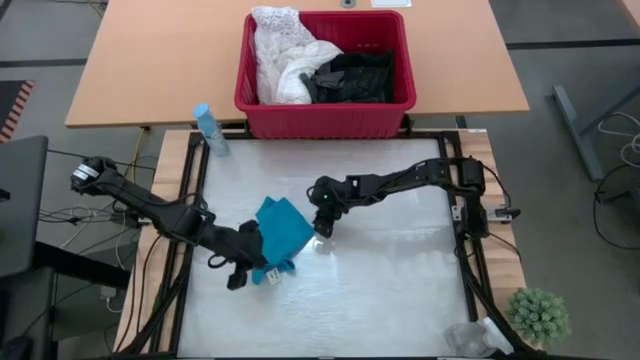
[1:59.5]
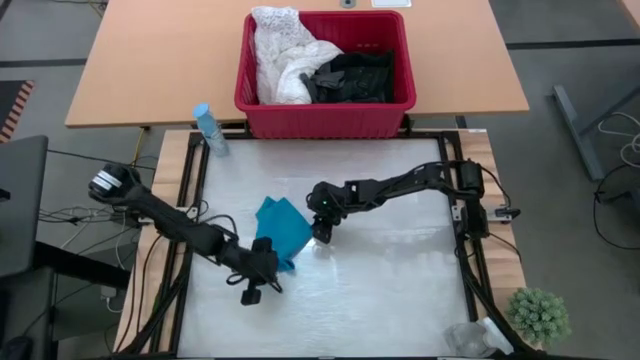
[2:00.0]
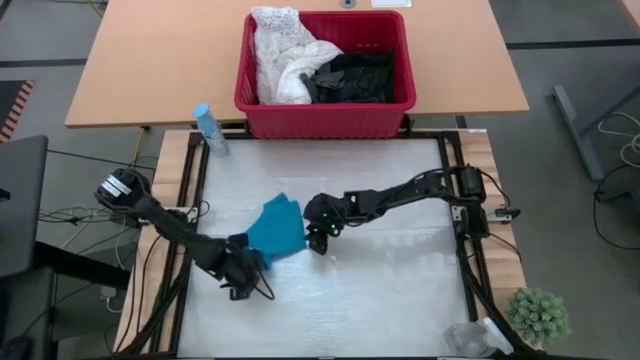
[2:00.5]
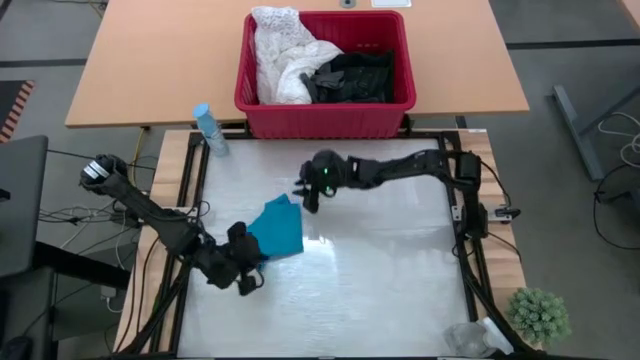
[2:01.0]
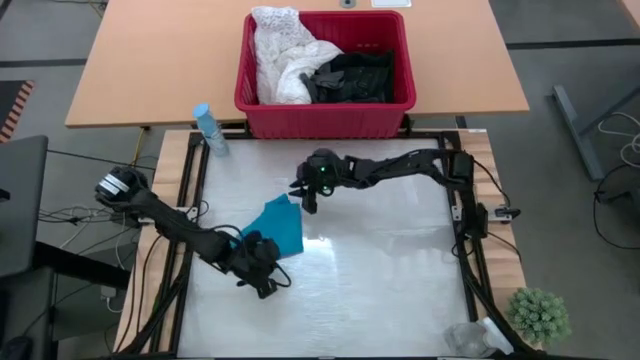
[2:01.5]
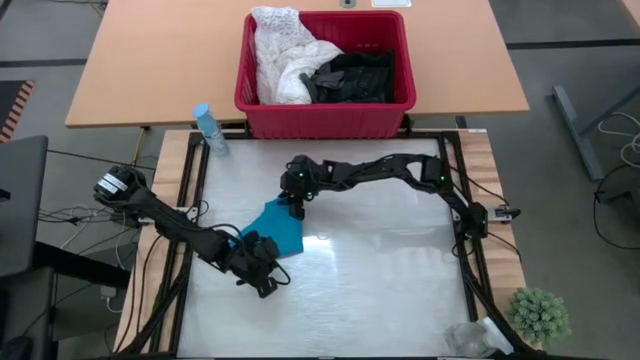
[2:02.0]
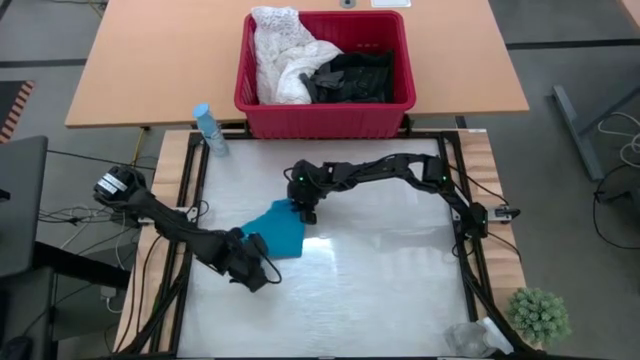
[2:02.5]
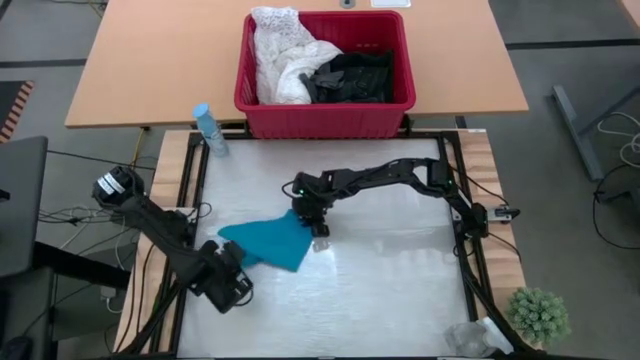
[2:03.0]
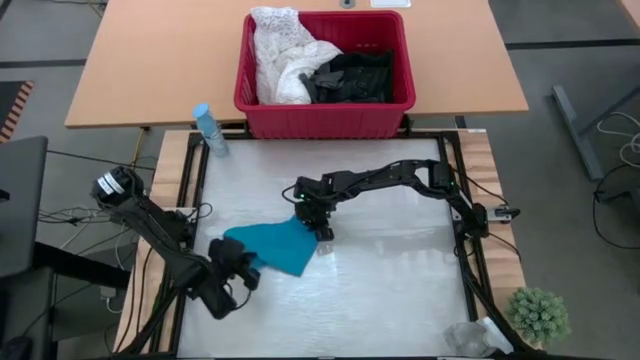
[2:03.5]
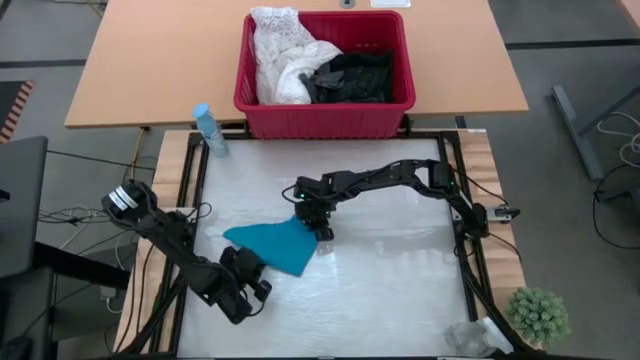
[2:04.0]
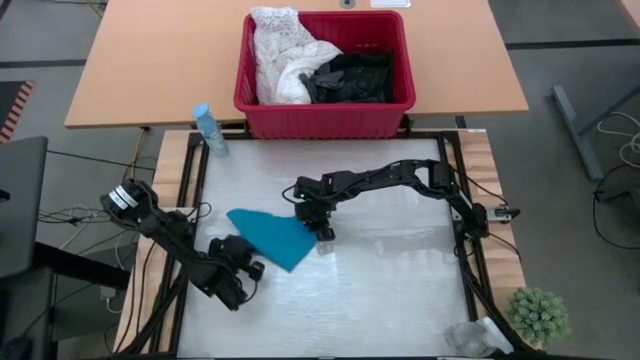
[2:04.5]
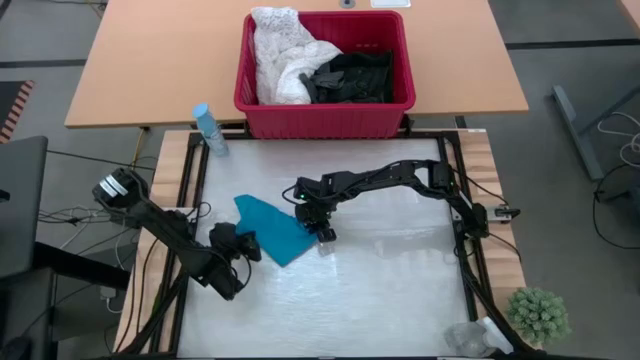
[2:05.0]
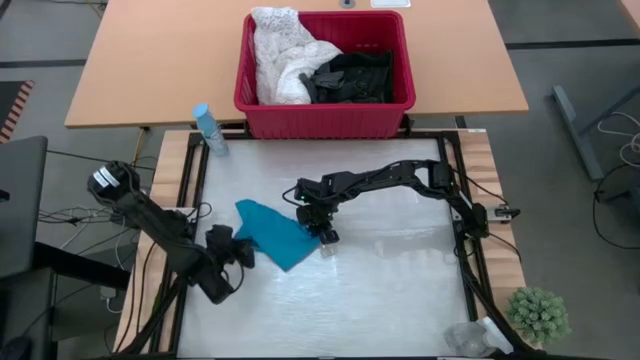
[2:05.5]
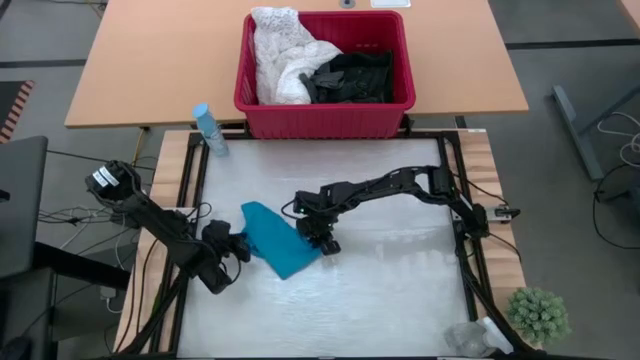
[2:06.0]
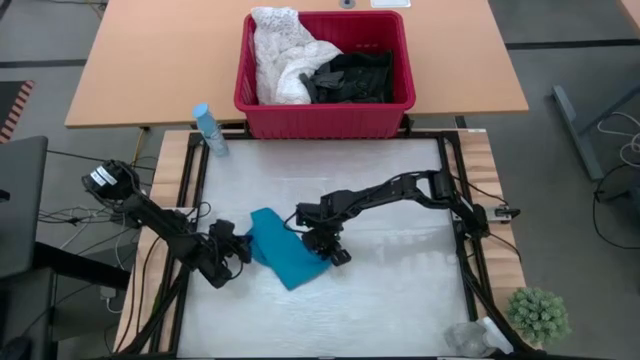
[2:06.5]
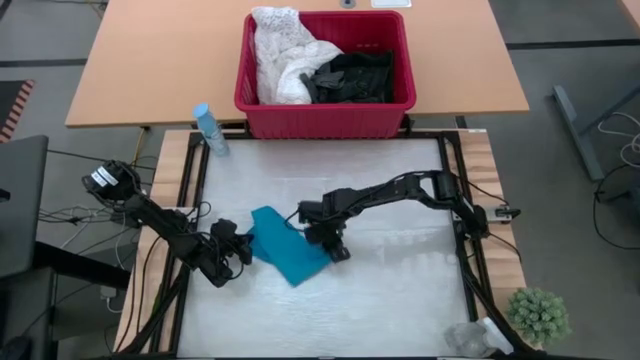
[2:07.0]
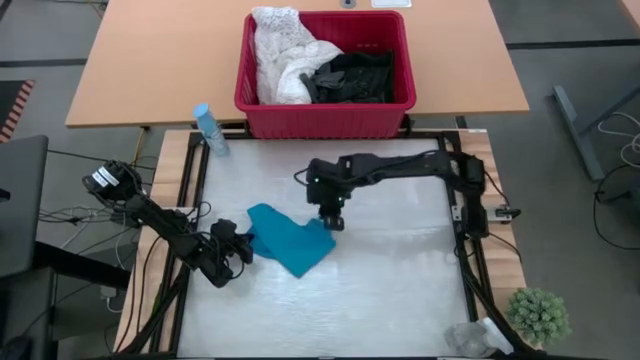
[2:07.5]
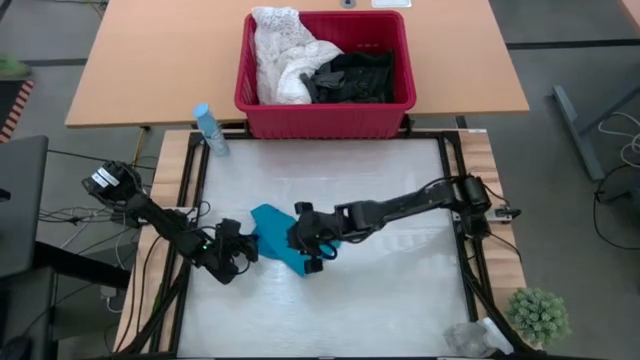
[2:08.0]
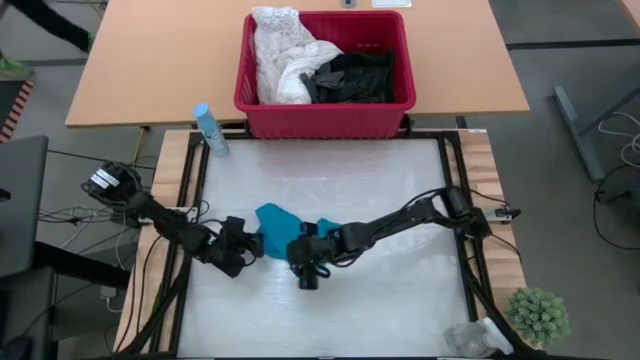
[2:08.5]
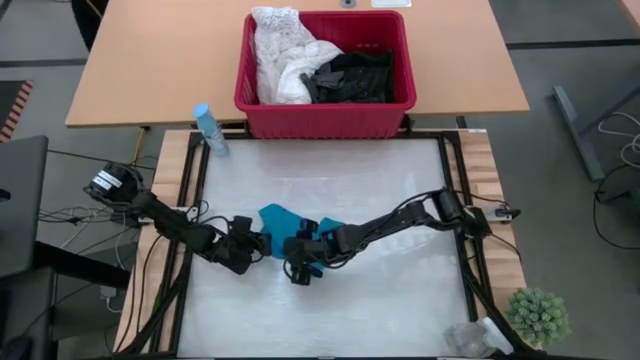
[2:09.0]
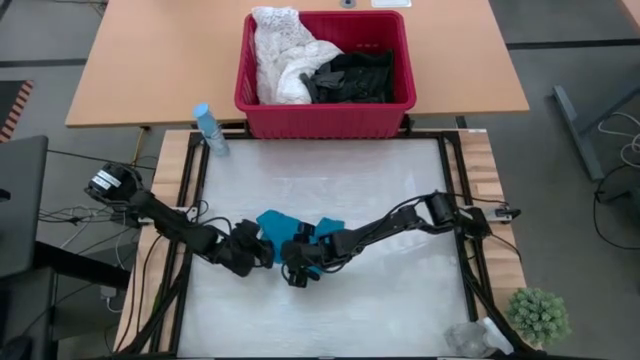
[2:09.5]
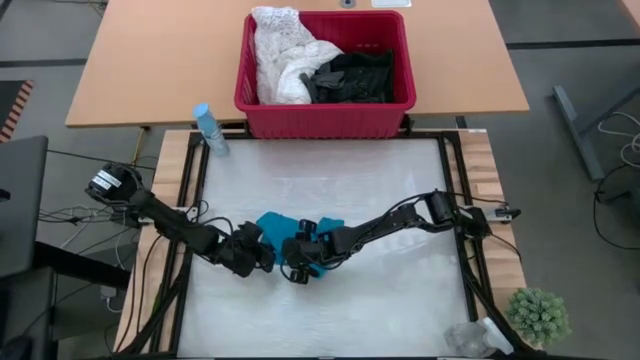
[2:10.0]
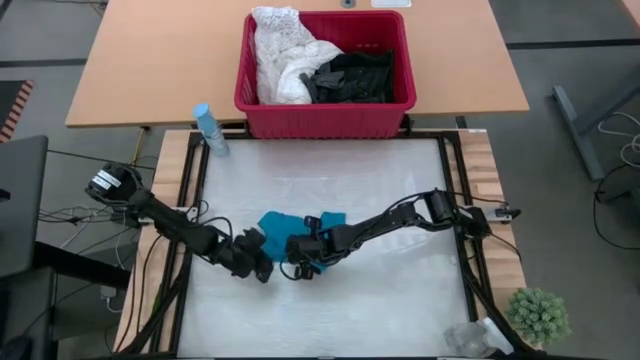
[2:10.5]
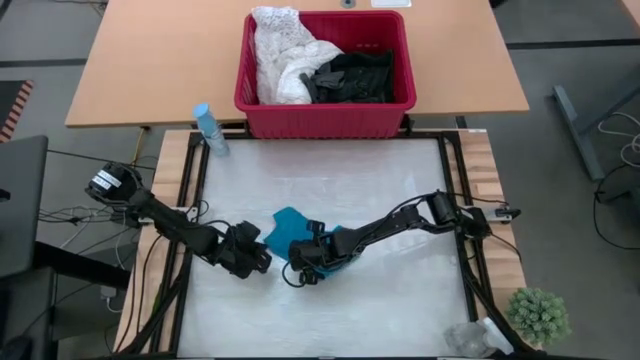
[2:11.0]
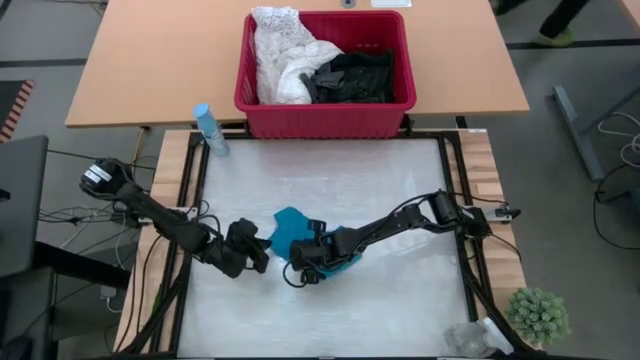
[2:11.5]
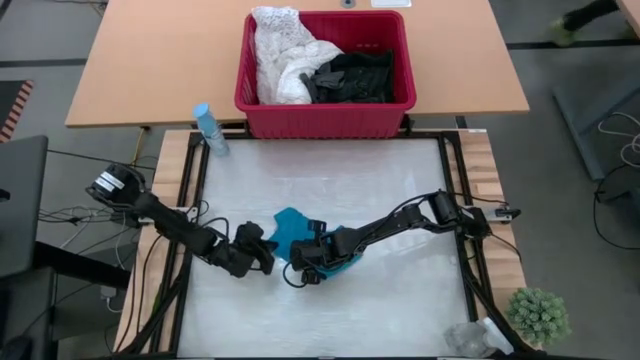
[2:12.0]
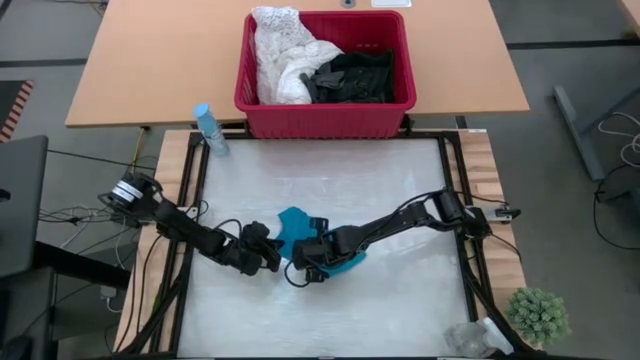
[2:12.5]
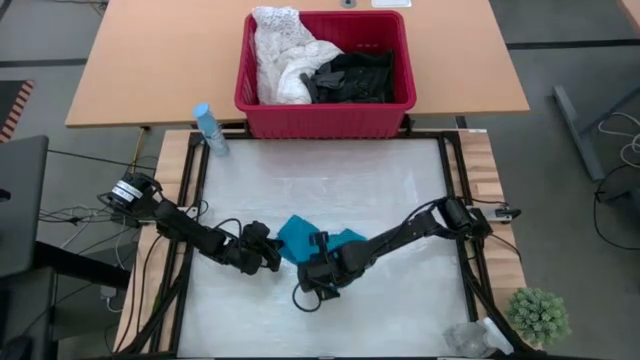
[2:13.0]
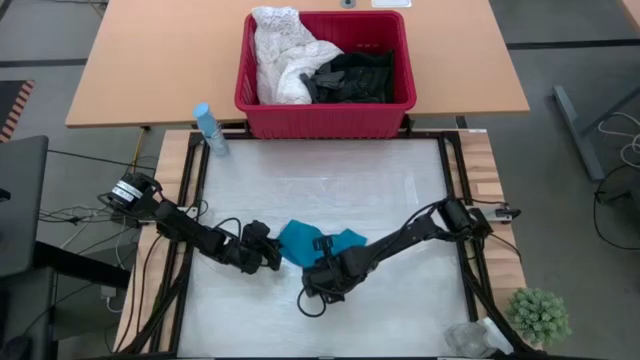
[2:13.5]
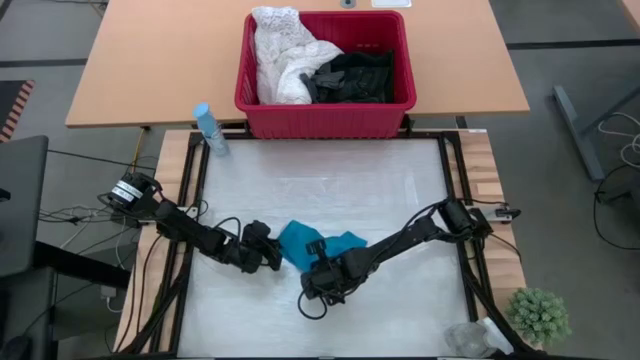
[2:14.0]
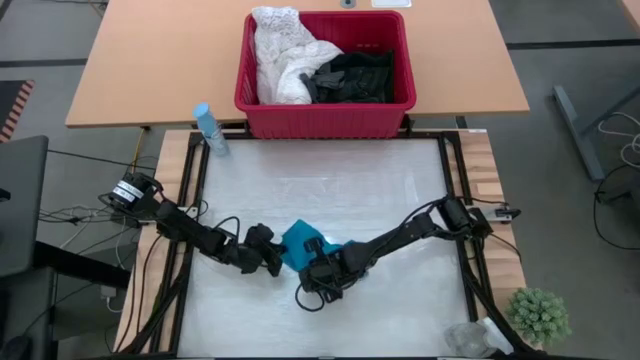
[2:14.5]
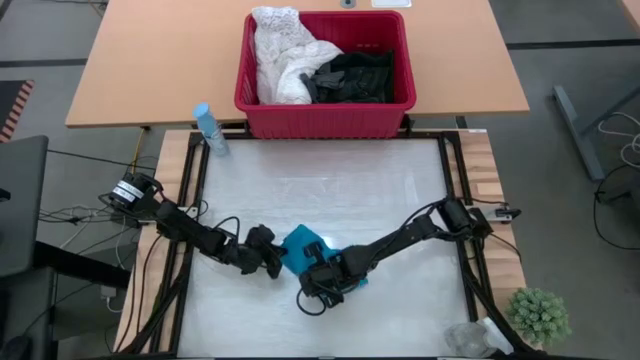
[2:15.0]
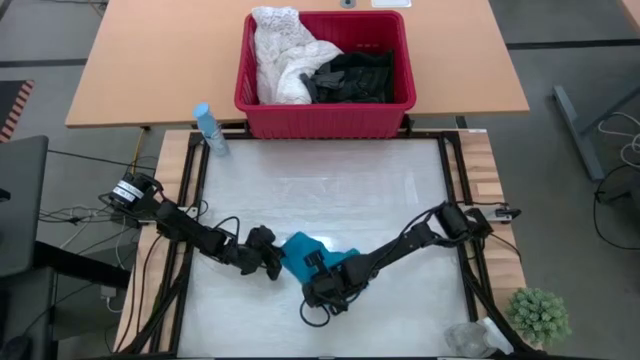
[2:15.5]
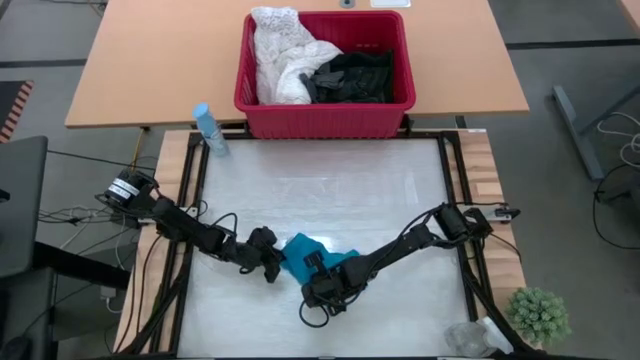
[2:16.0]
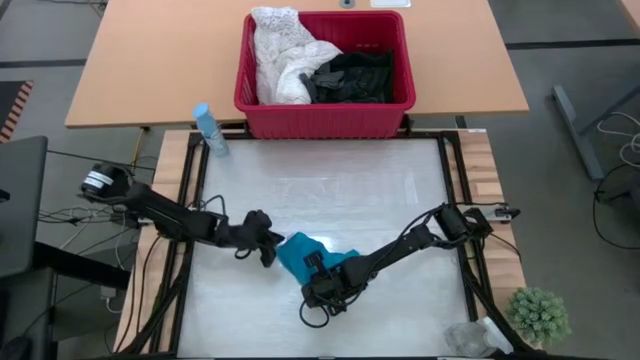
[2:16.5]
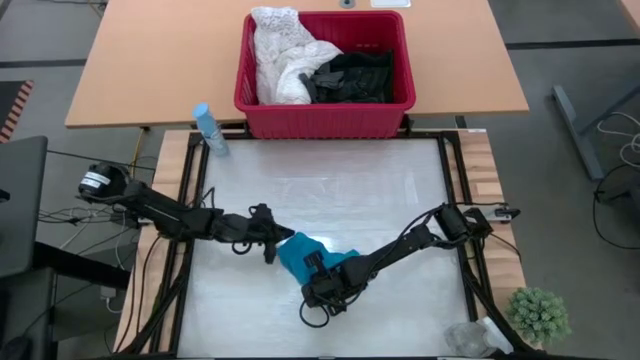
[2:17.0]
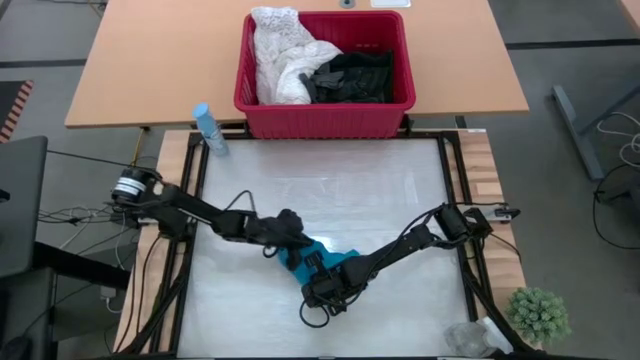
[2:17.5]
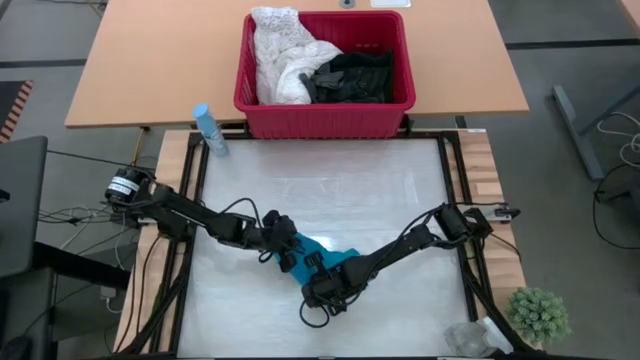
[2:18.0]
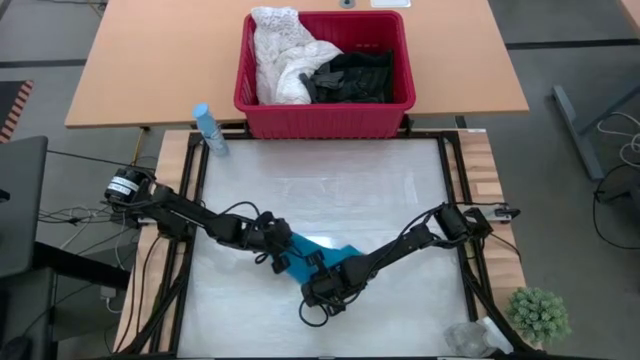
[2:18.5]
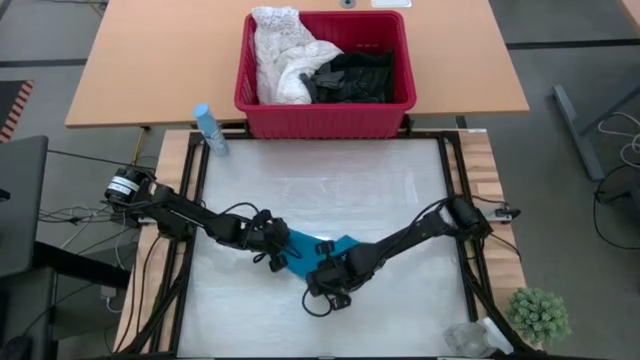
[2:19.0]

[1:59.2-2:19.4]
Task: Fold laundry
Fold the blue shorts

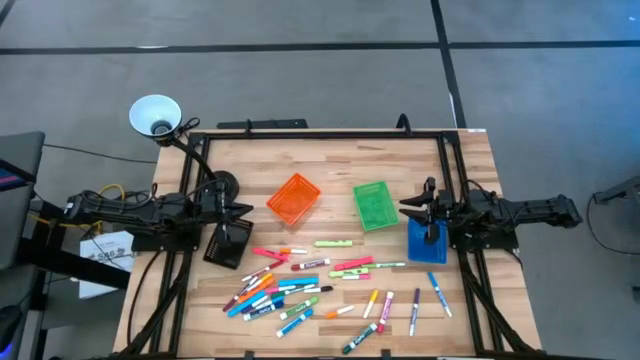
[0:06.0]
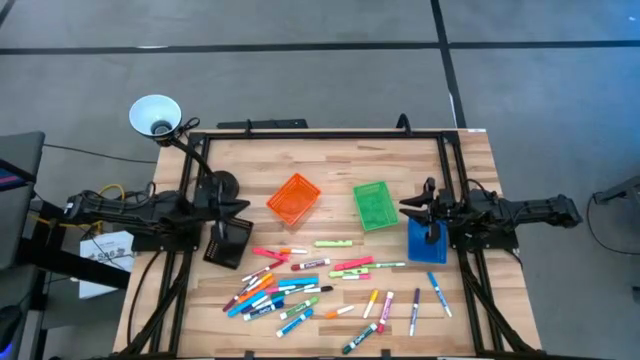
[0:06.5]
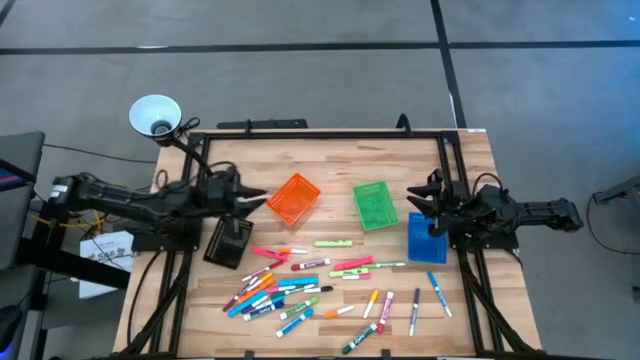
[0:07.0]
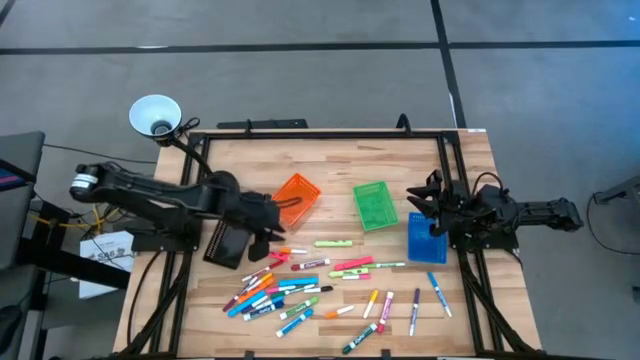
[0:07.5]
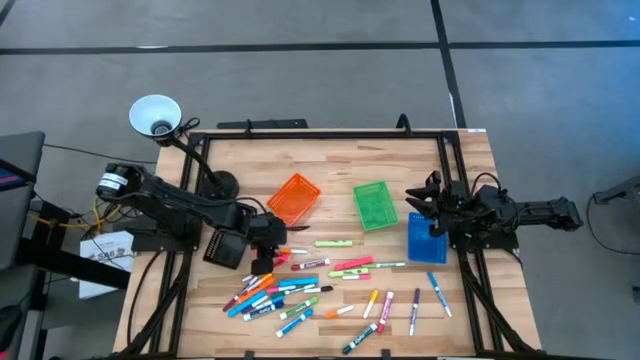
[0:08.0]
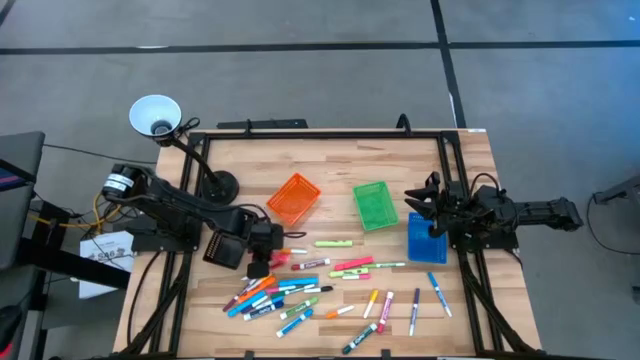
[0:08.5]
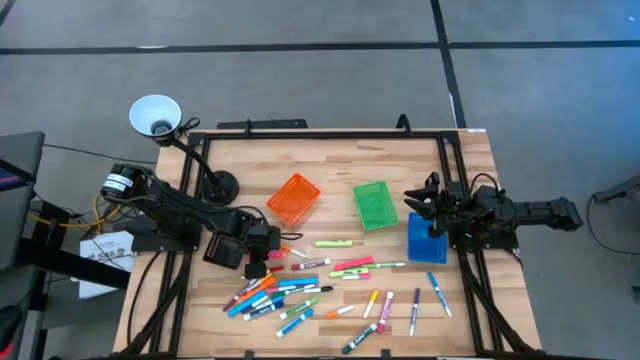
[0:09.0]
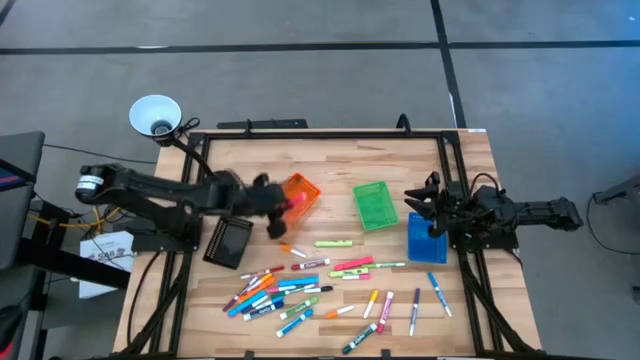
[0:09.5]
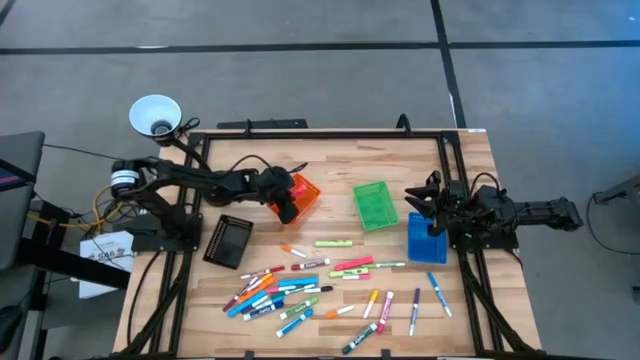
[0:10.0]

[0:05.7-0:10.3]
Task: Pick & Place Markers
Put the left pink highlighter pen into the orange bin
